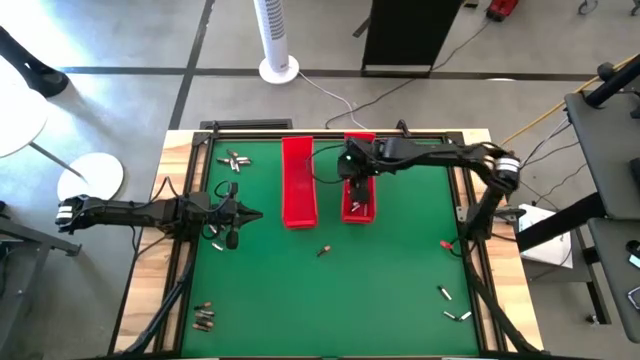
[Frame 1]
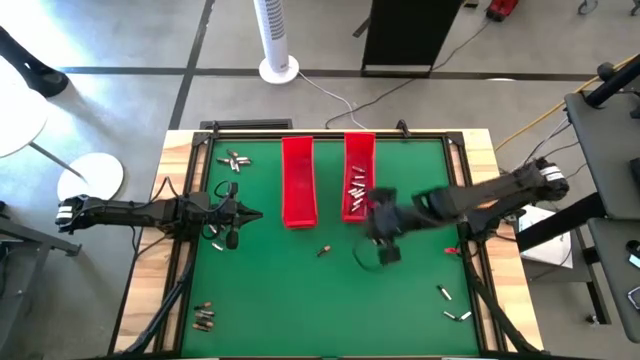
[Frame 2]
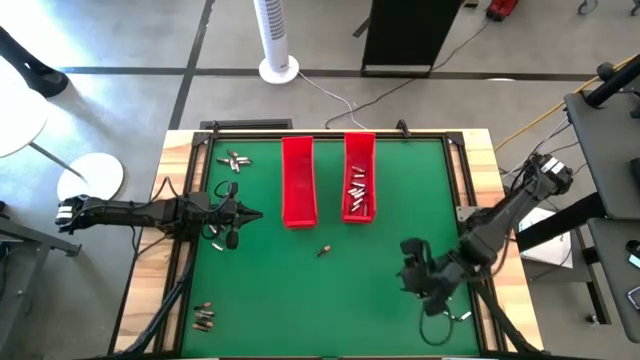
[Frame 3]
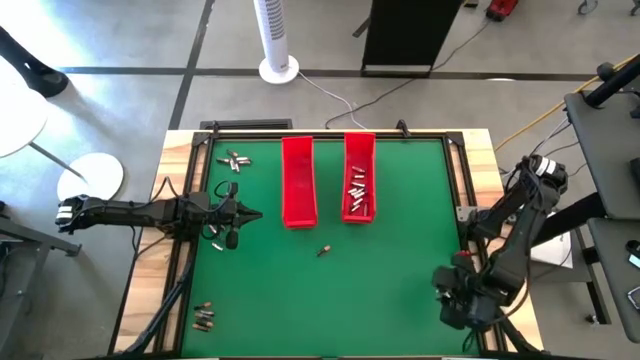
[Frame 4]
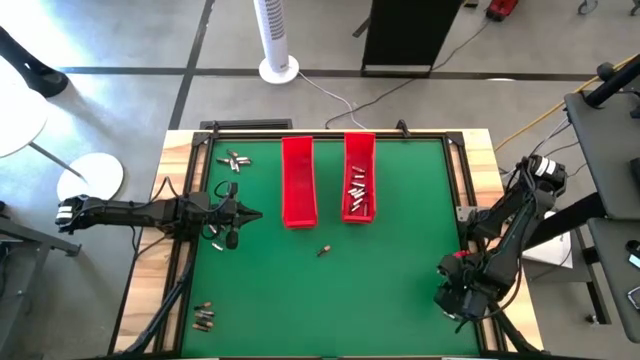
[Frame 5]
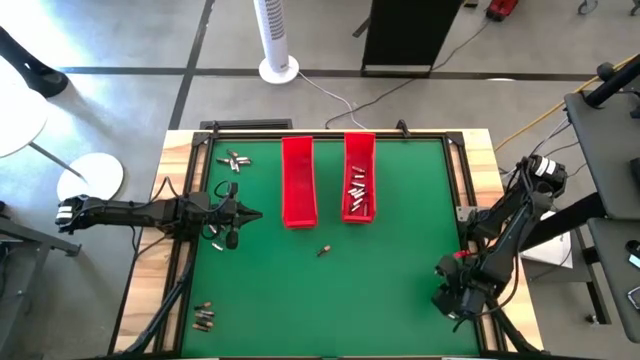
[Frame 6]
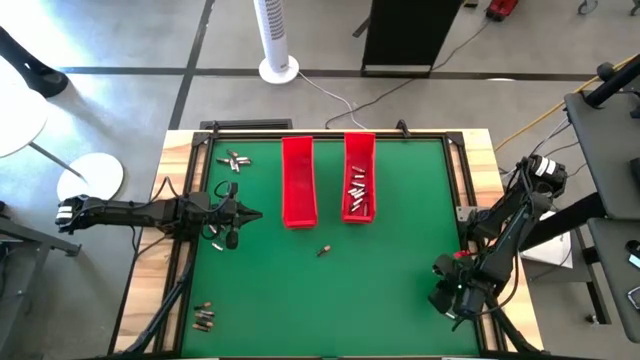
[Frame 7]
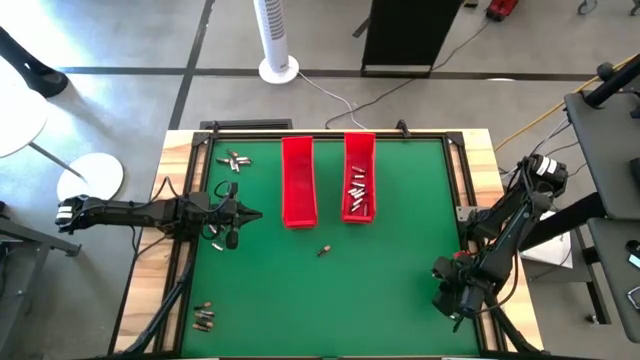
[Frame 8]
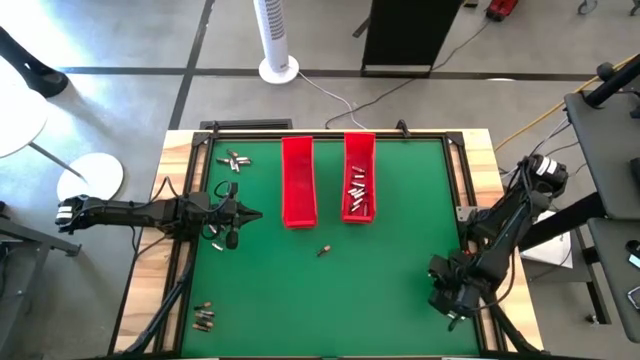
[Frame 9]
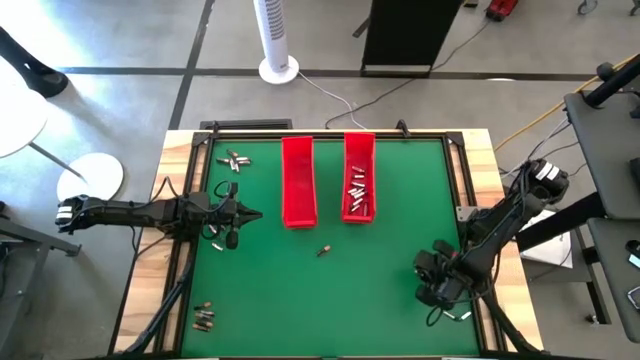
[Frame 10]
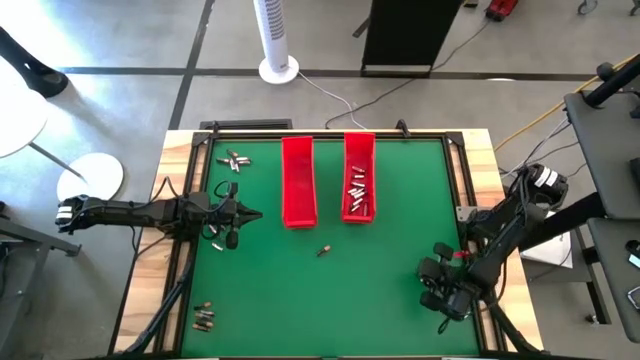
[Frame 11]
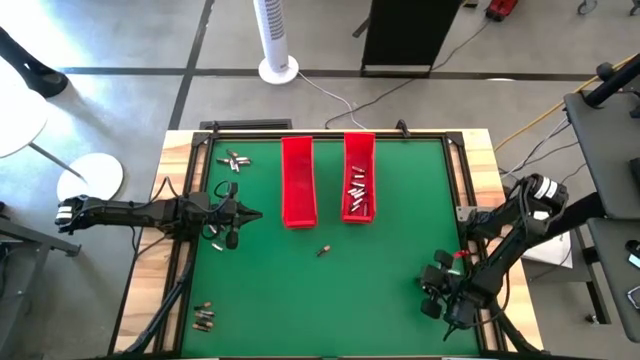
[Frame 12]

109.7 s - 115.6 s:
Task: Sort batteries
Put the silver battery into the right red bin

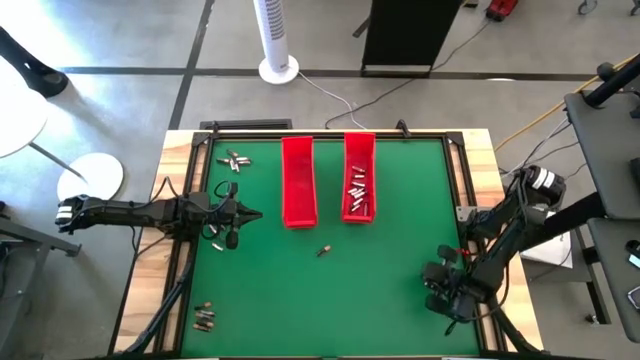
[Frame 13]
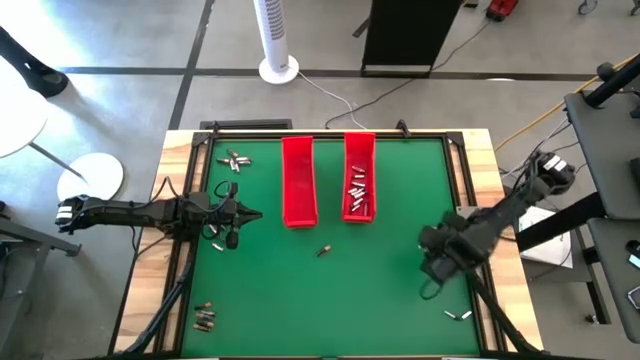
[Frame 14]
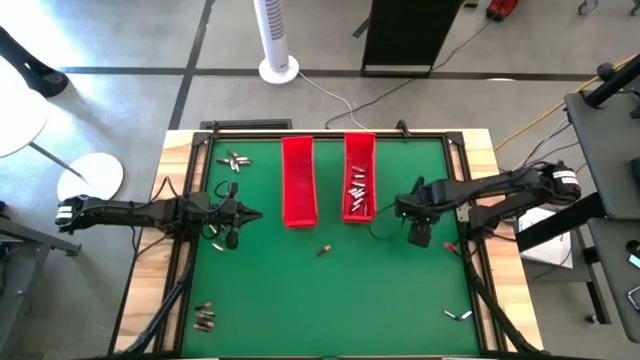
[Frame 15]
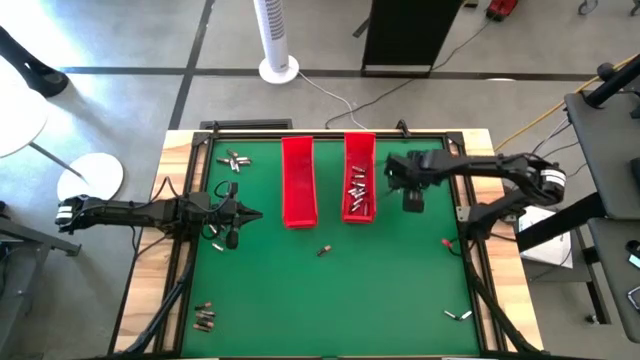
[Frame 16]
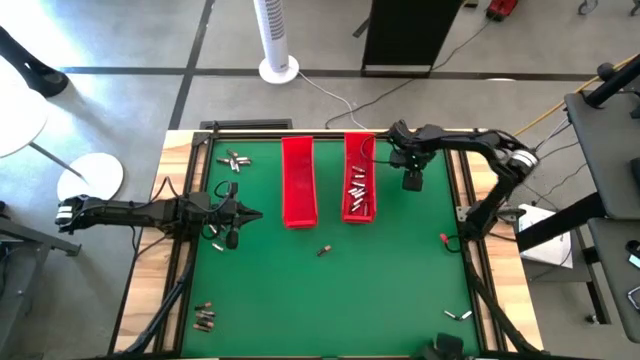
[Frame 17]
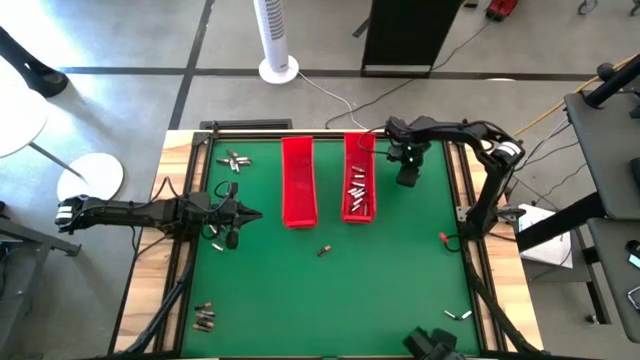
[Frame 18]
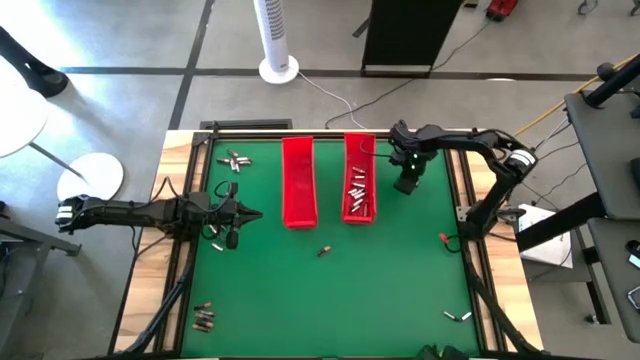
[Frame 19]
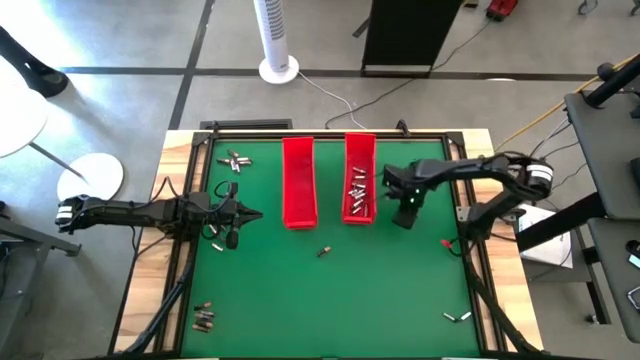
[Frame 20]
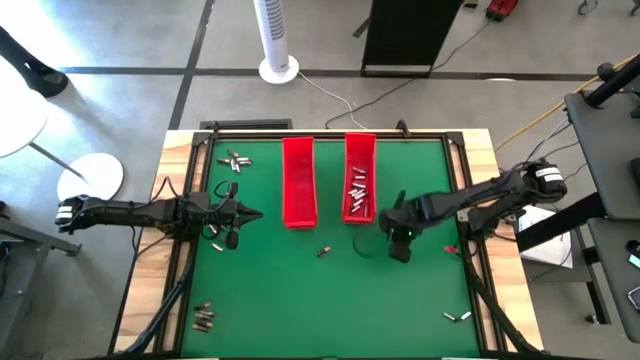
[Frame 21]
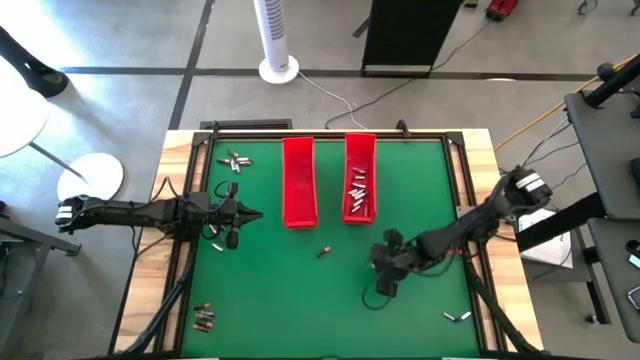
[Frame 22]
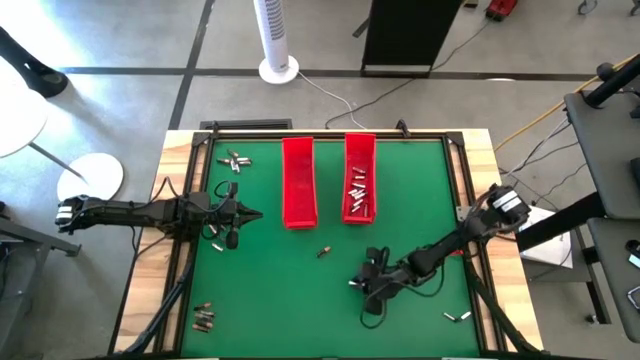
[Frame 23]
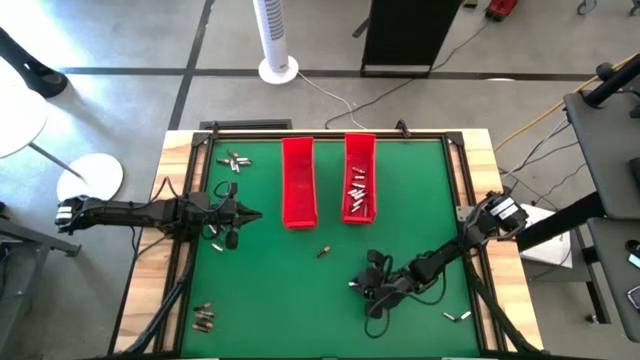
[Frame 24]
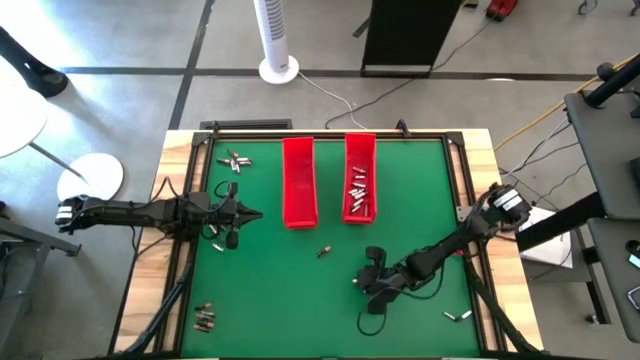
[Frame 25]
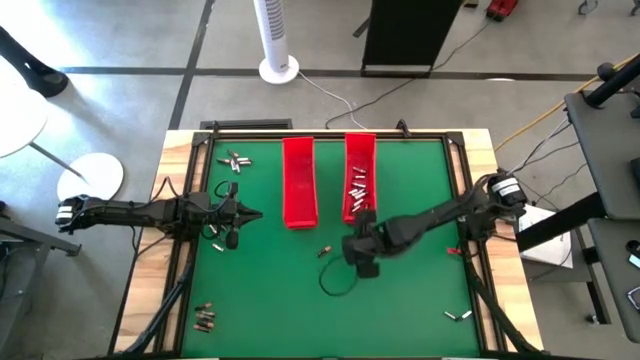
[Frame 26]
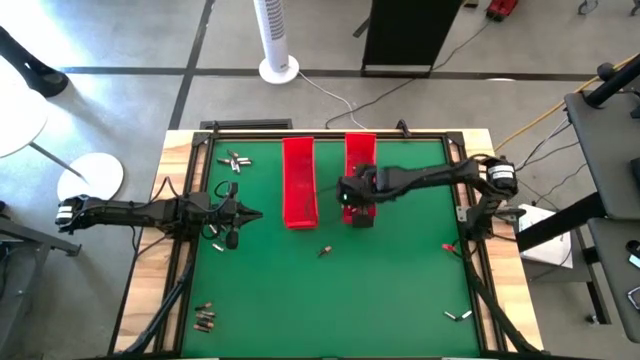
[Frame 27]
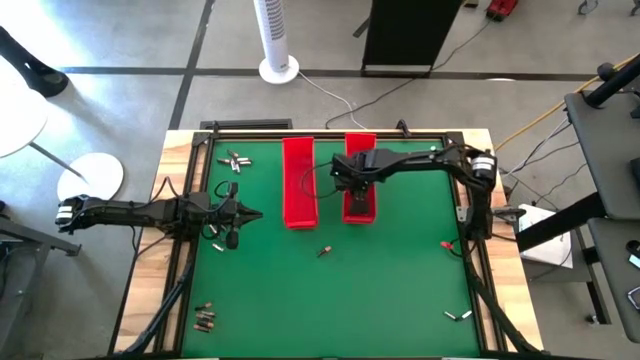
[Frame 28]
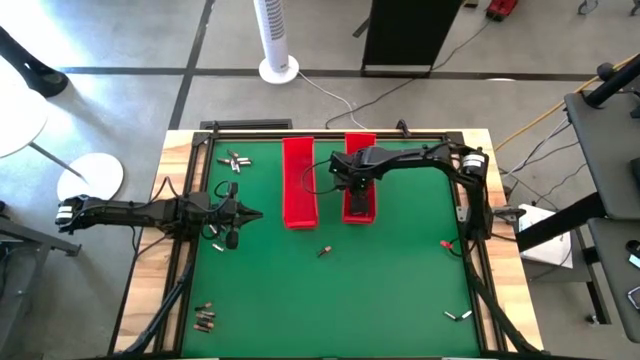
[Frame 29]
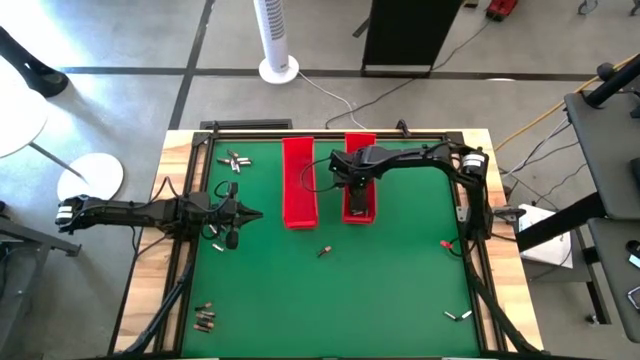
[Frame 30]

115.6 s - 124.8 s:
Put the silver battery into the right red bin

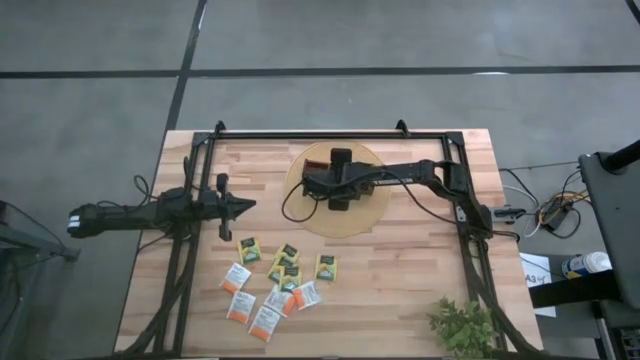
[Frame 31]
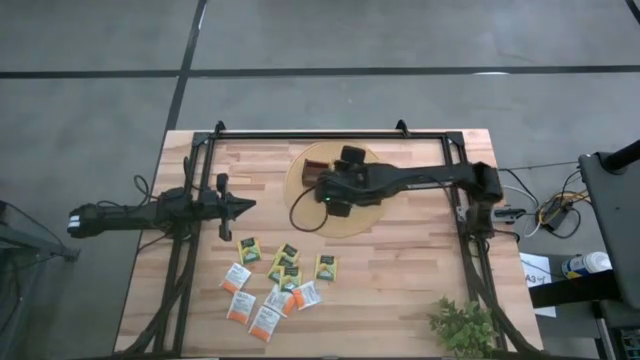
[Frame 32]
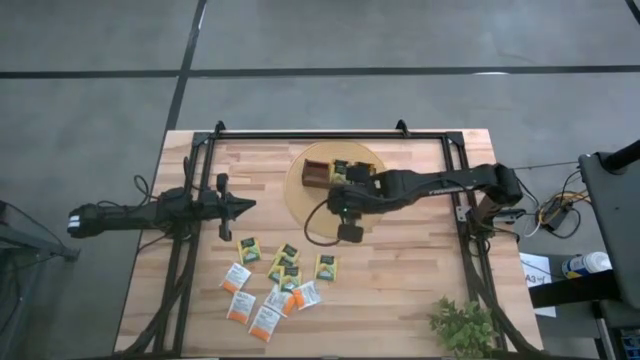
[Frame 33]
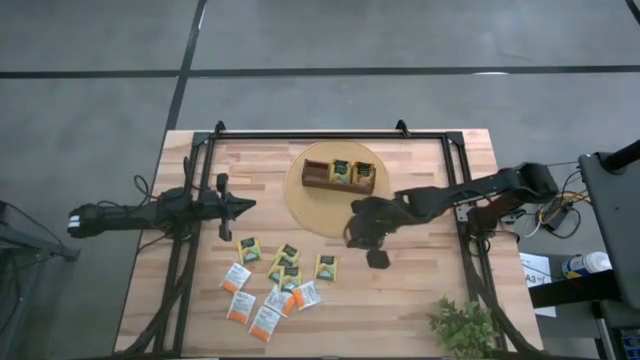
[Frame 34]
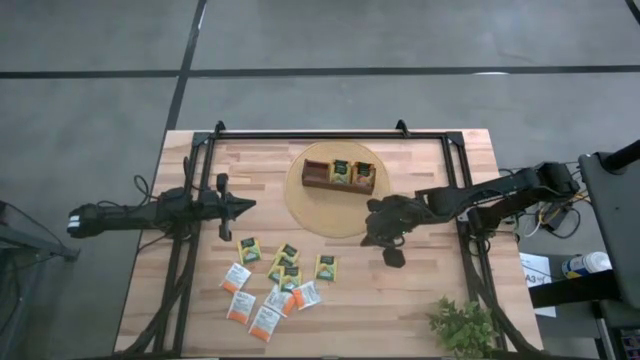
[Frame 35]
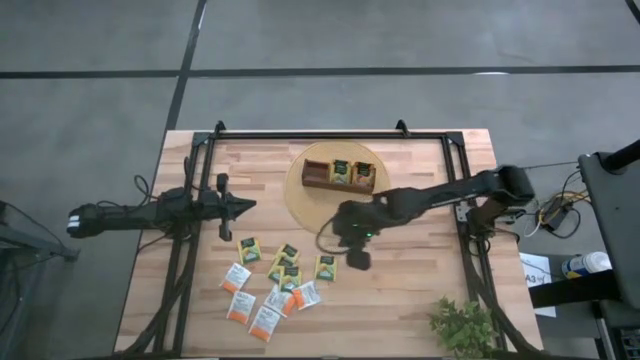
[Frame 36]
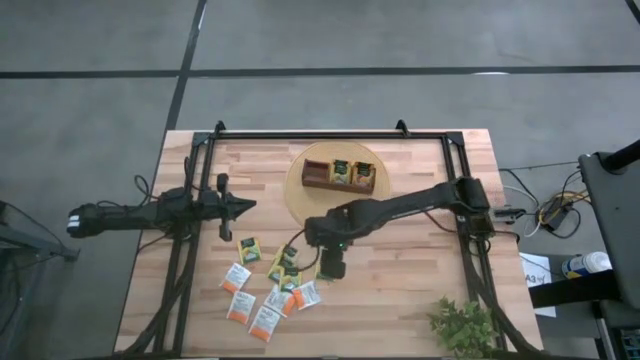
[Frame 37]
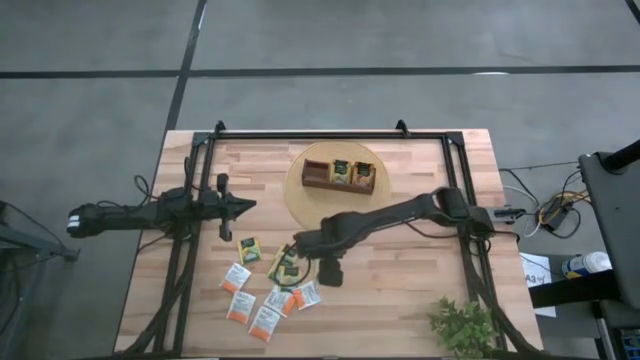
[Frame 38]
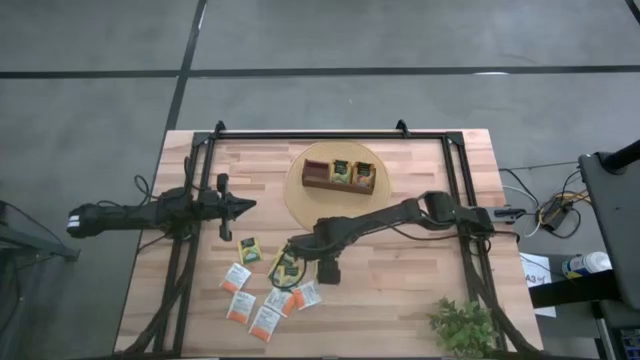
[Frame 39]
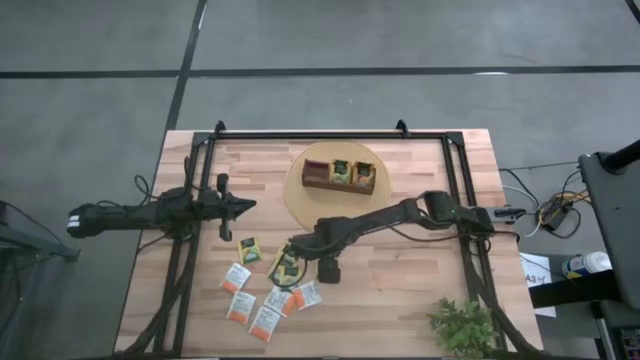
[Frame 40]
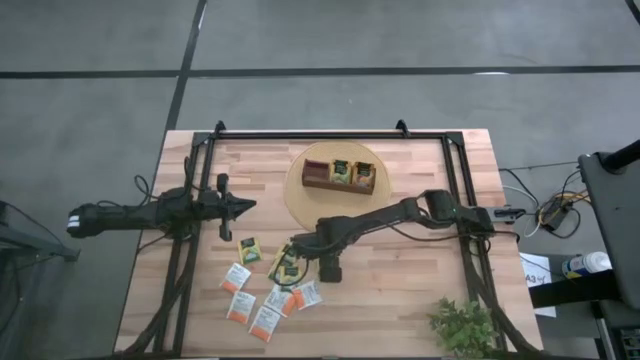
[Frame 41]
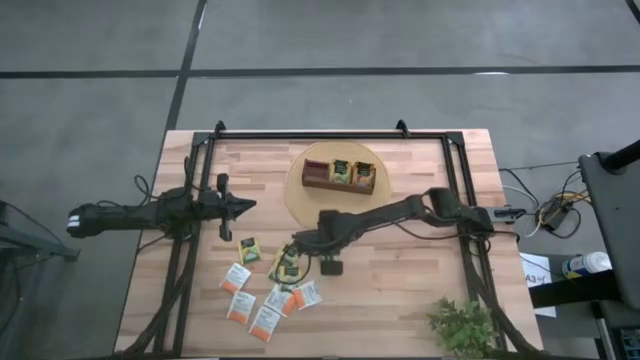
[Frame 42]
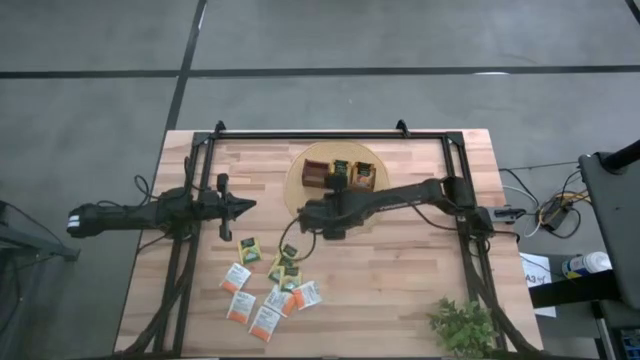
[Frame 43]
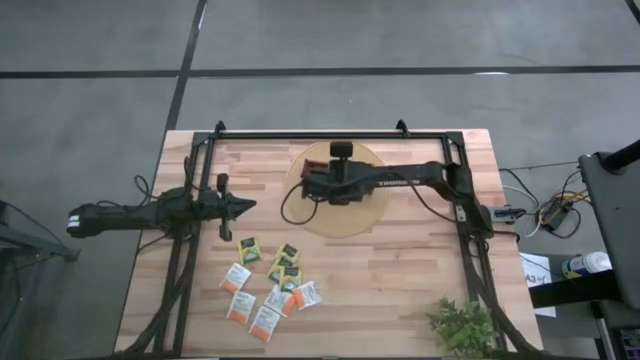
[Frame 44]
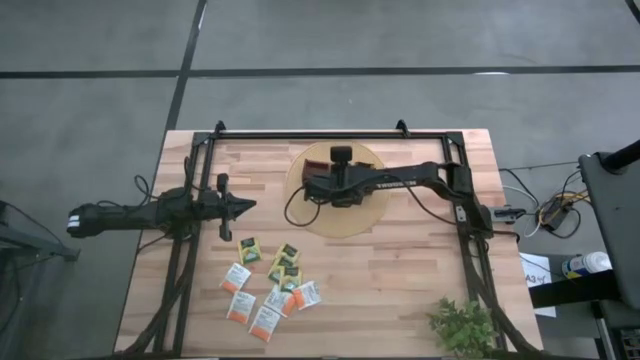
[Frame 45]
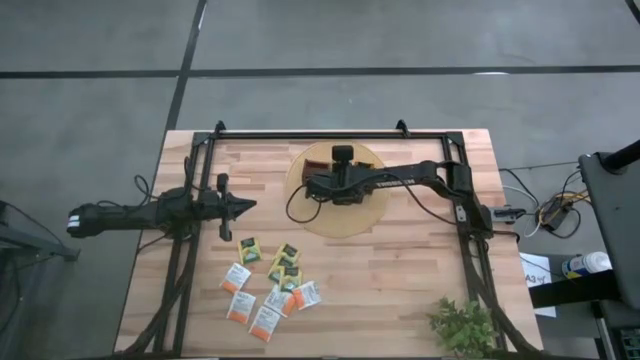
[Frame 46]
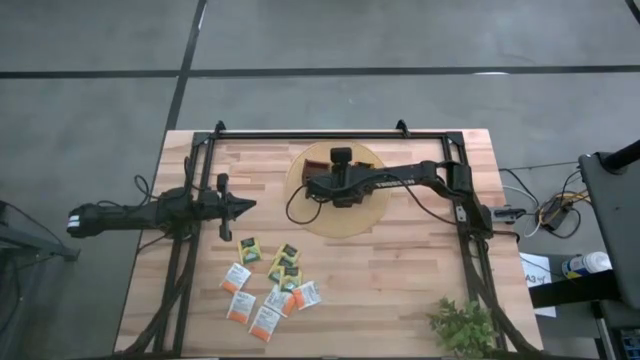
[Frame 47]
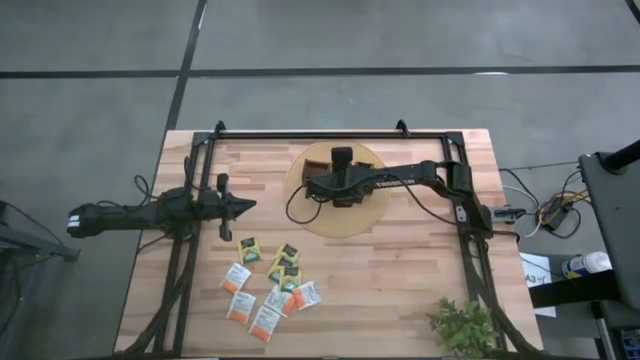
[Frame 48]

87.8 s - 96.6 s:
Task: Pick & Place Tea
Put the green tea bag into the middle section of wooden organizer
